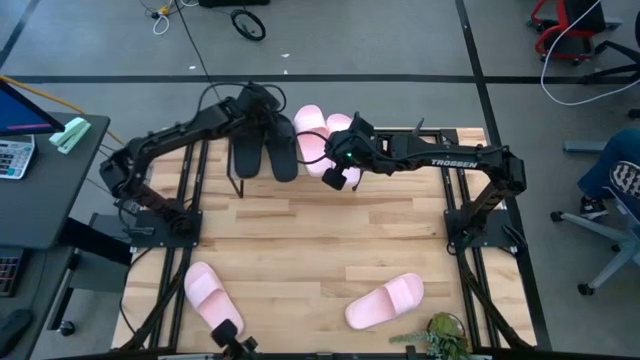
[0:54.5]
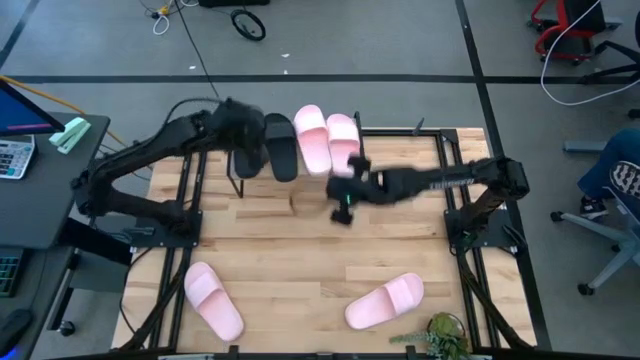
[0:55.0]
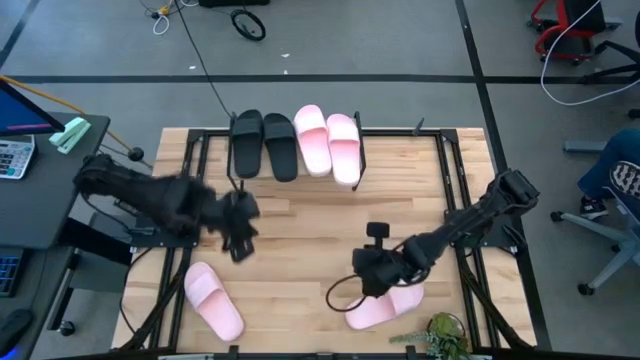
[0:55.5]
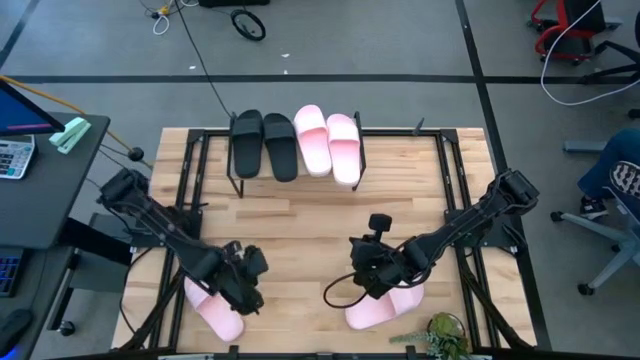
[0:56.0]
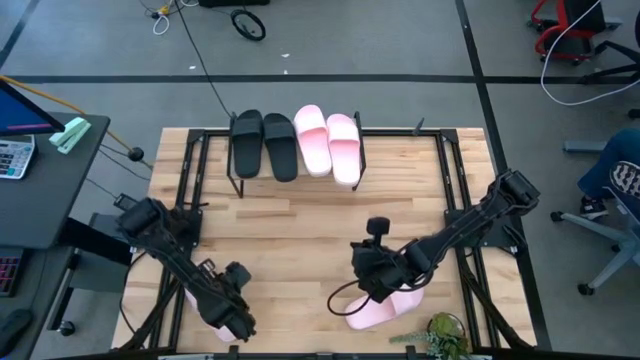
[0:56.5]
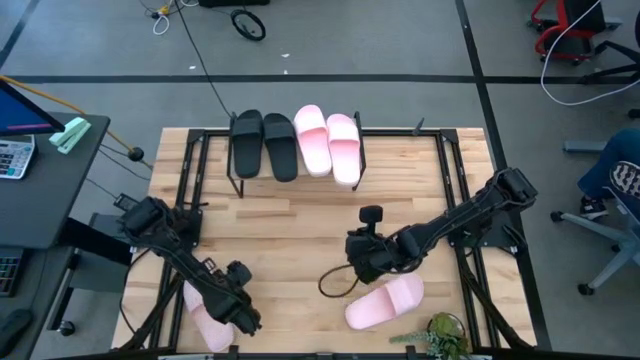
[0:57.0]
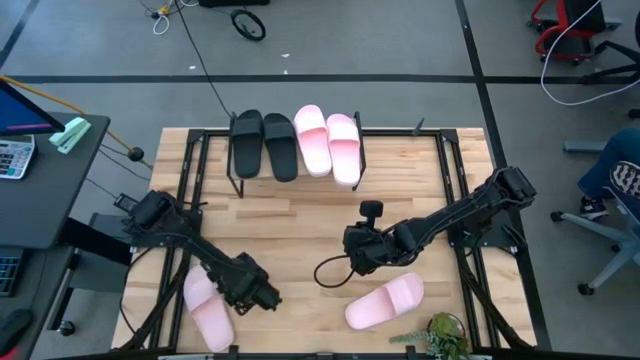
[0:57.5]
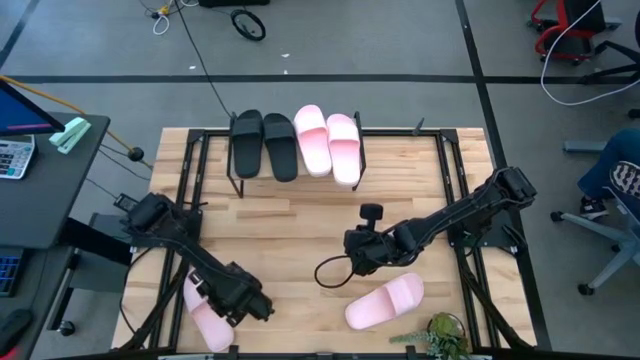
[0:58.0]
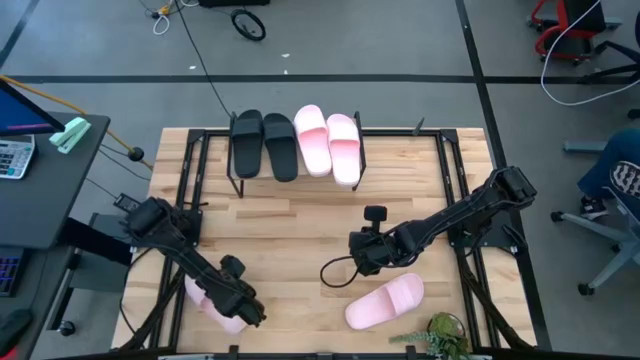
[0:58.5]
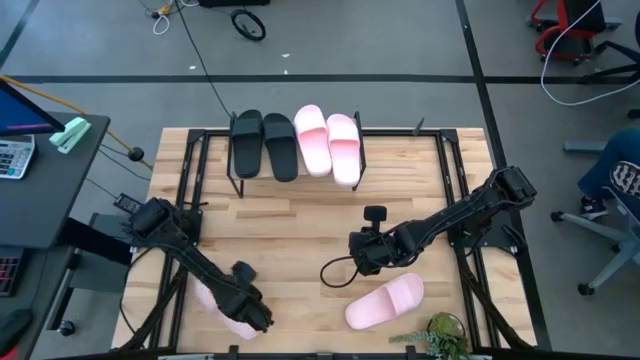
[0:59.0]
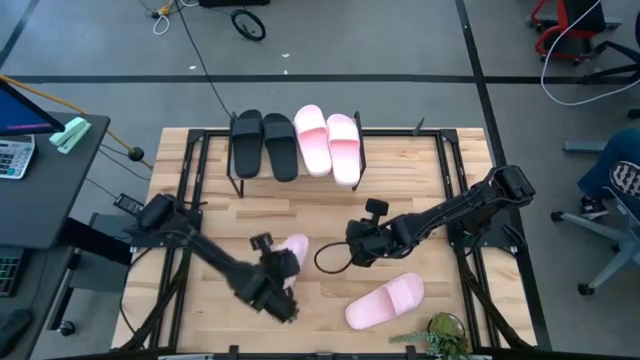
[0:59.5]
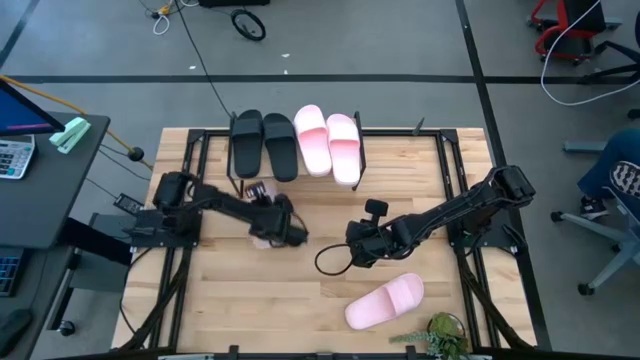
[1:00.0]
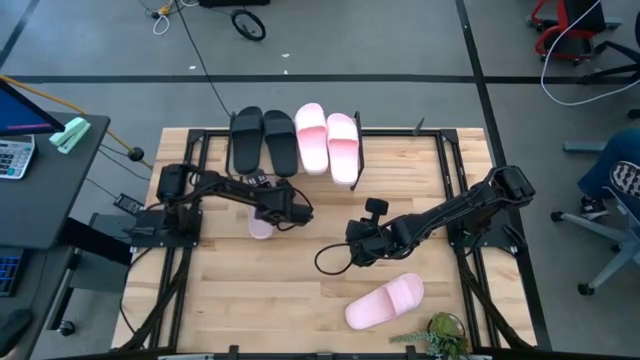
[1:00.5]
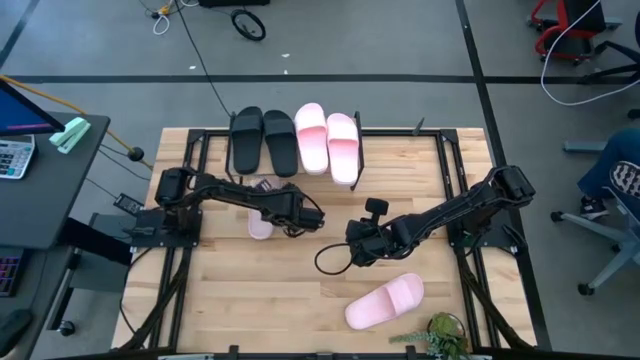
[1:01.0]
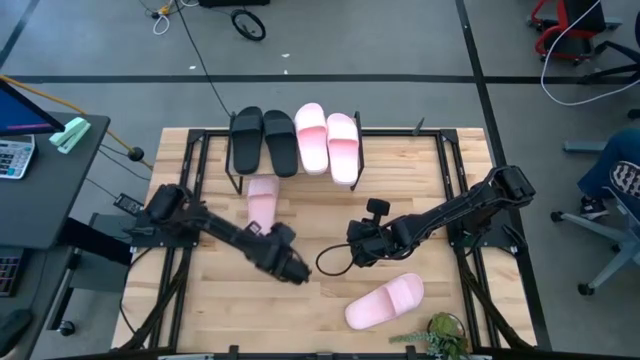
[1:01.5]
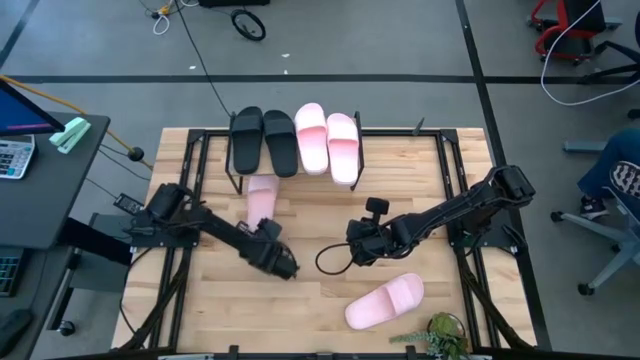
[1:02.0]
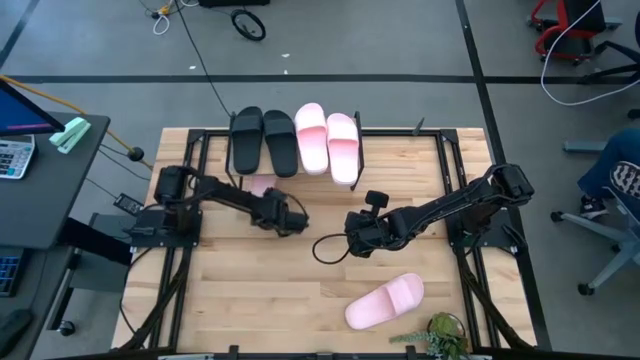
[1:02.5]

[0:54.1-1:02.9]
Task: Pick and place slides into the shelf
Put the pink slipper under the shelf

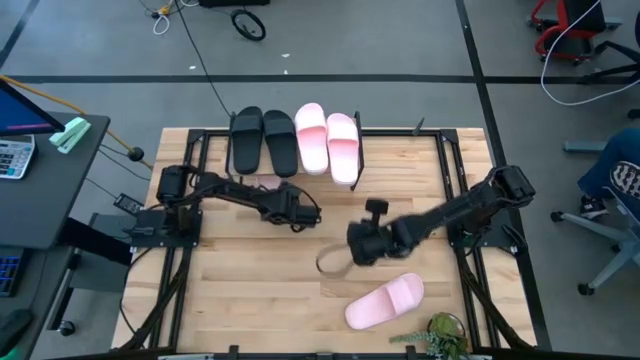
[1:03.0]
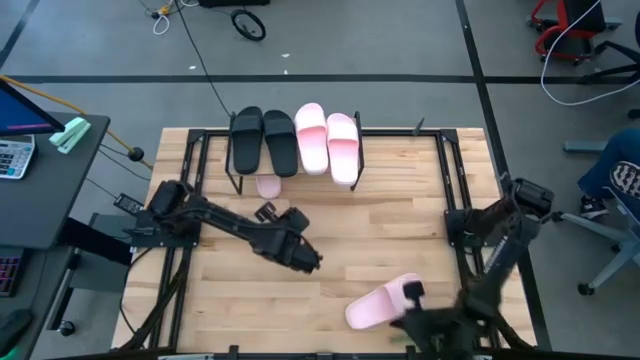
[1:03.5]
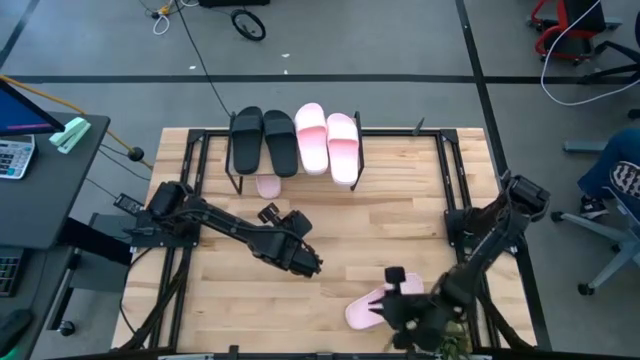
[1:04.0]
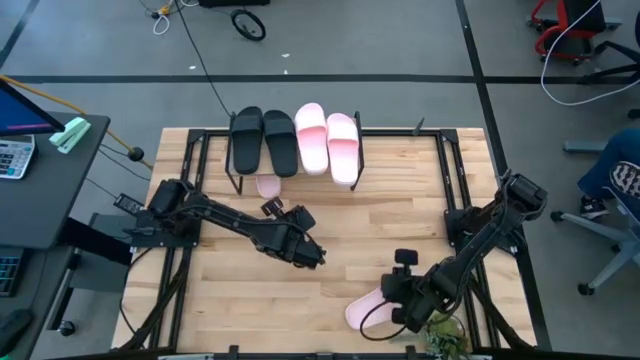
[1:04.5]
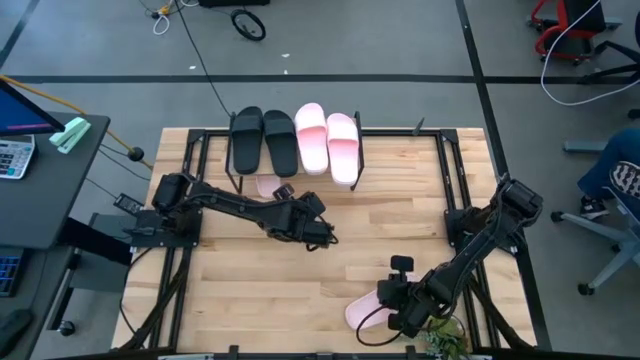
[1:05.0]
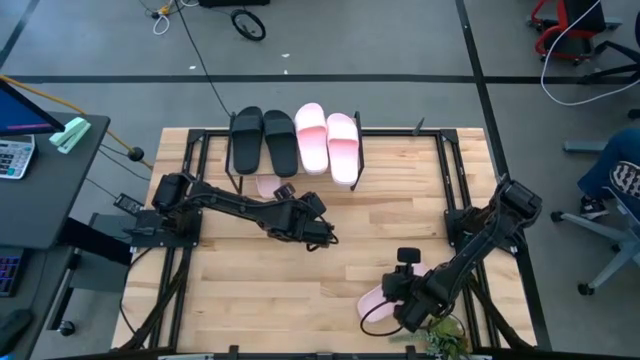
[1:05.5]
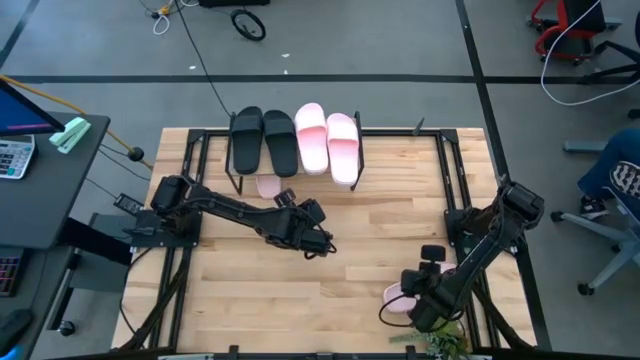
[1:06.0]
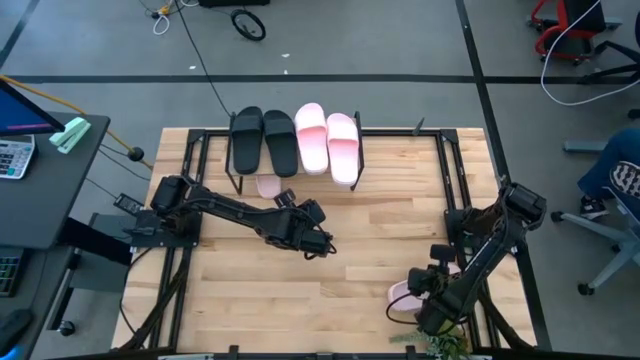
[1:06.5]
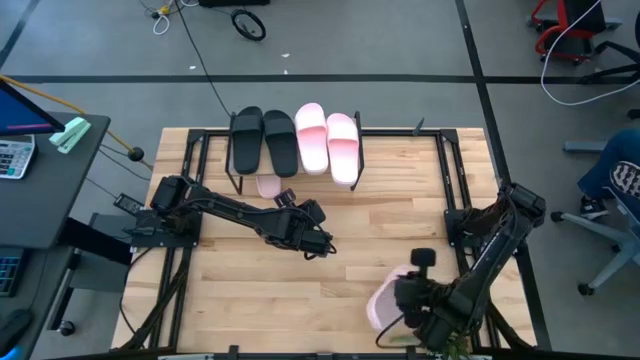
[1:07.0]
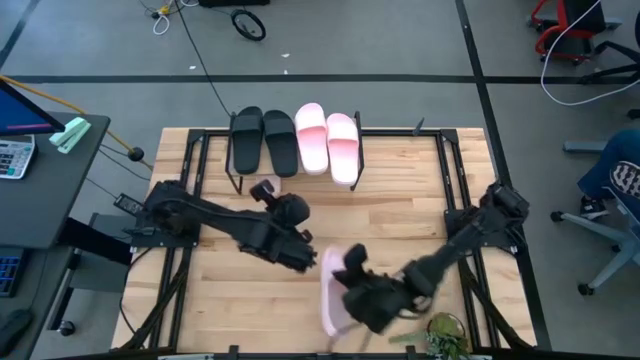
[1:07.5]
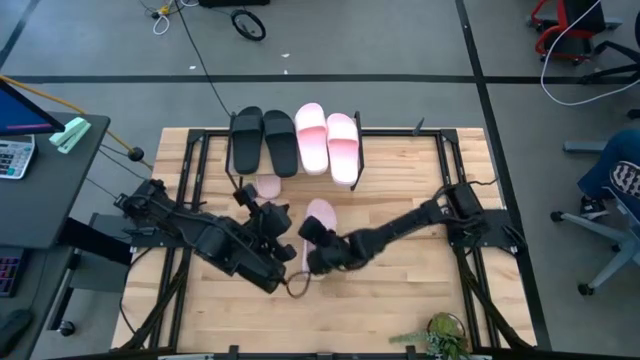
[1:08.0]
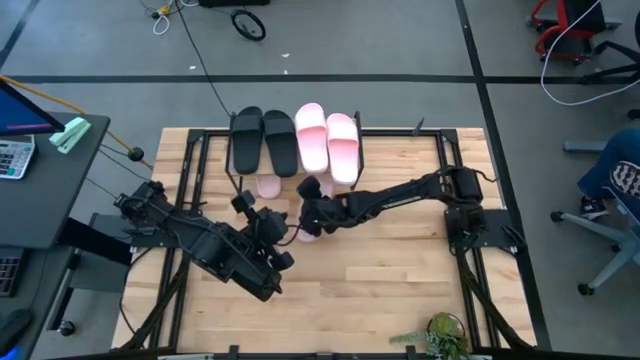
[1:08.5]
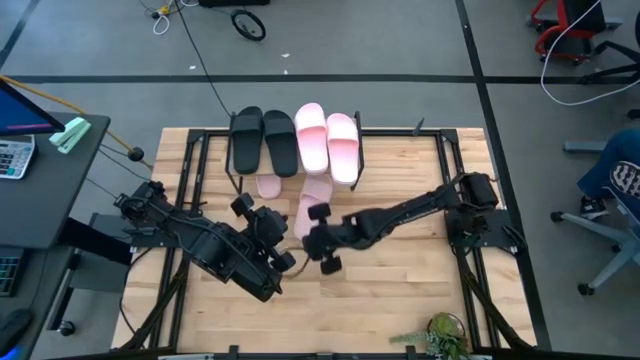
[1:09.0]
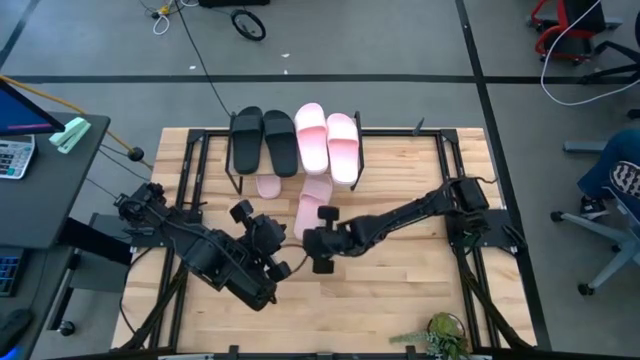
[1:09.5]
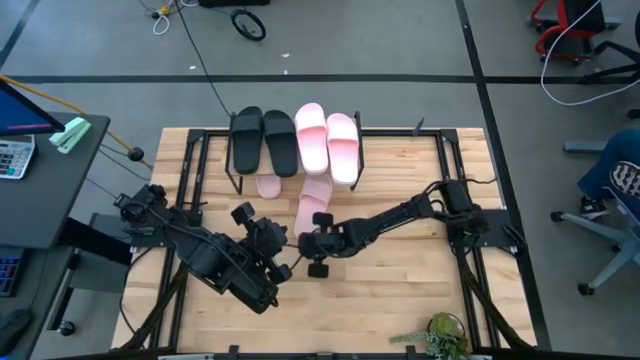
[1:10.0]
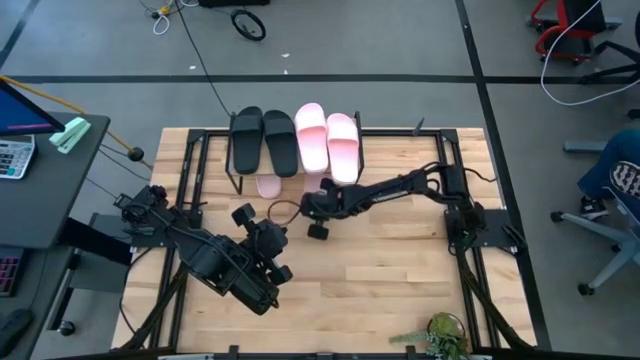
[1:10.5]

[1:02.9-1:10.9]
Put the pink slipper under the shelf

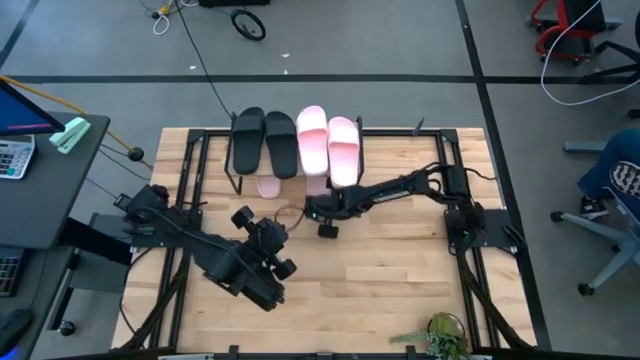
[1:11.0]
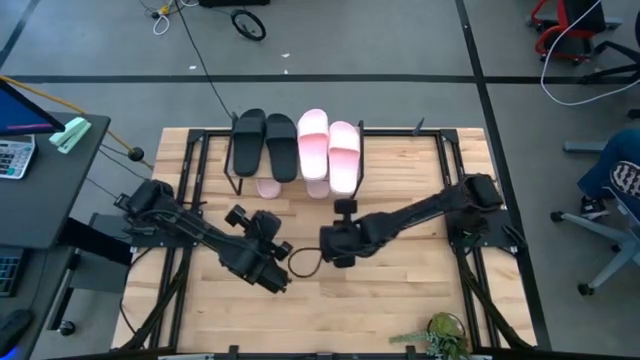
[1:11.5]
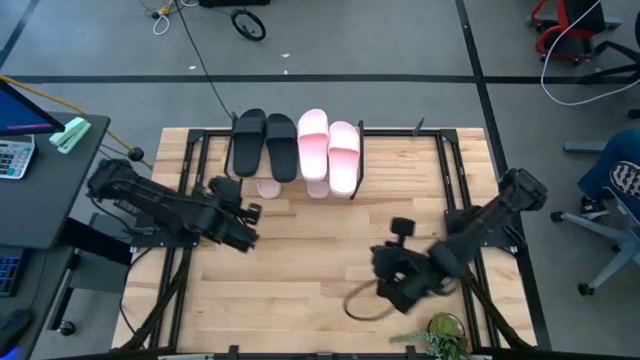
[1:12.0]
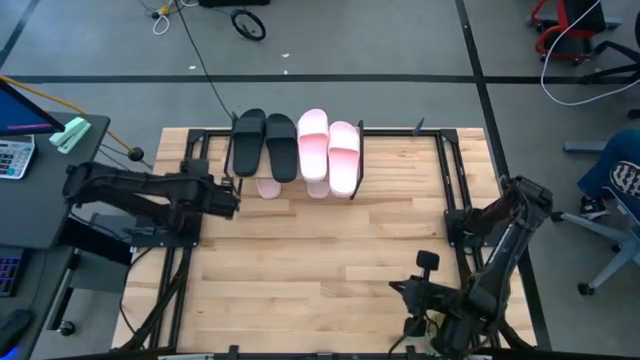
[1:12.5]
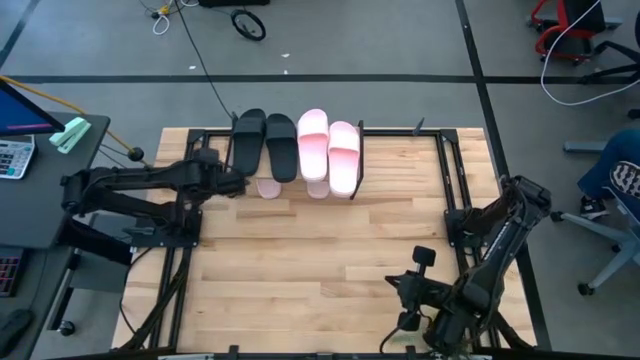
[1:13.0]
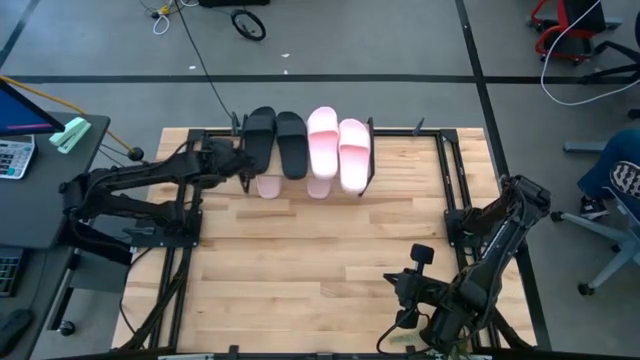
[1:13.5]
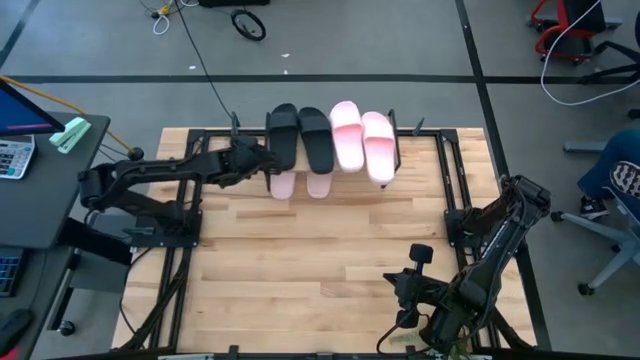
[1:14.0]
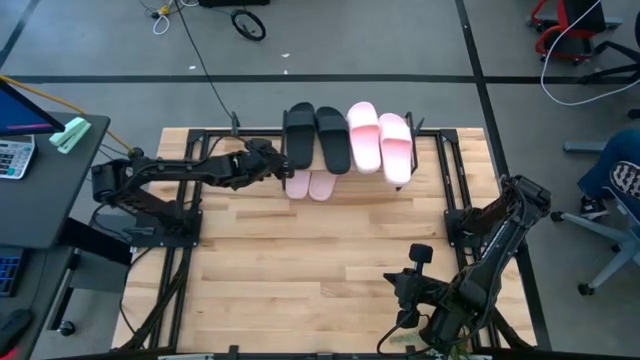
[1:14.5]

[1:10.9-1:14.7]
Adjust the shelf

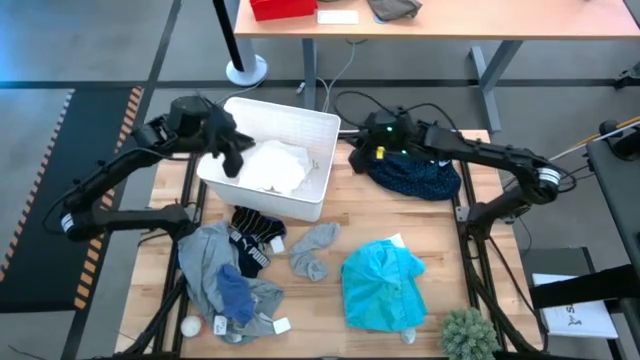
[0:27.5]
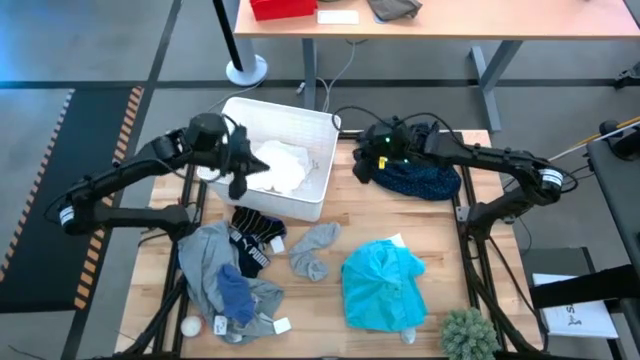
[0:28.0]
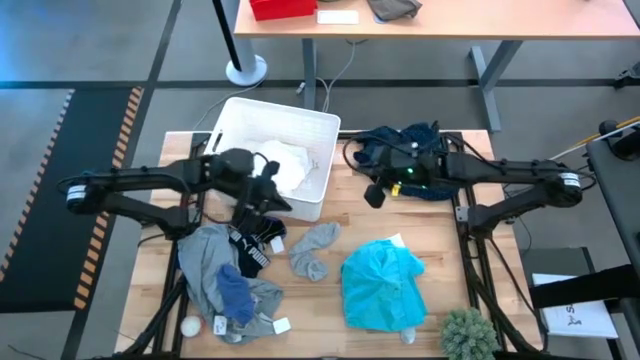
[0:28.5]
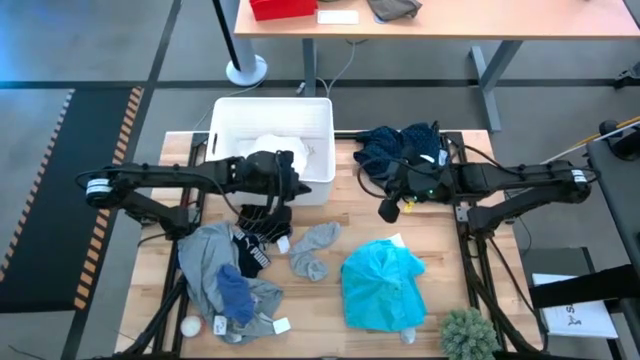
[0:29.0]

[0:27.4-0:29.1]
Task: Sort clothes
Adjust the white bin
